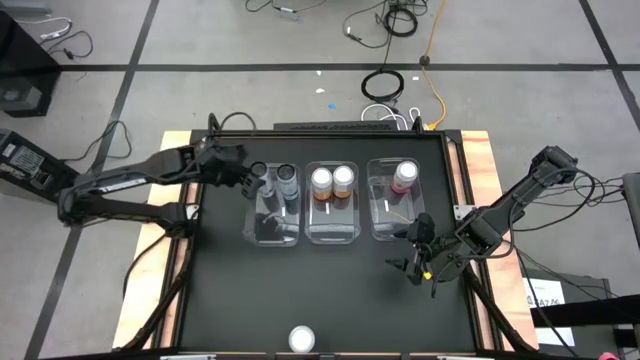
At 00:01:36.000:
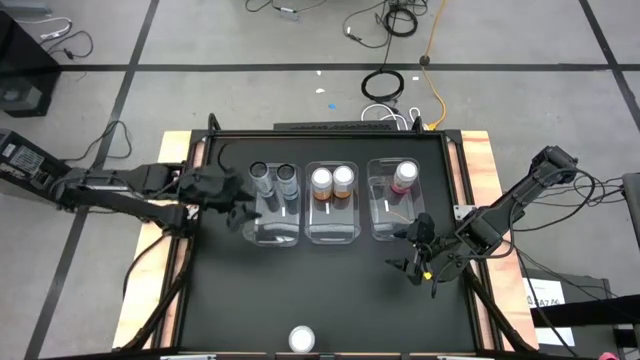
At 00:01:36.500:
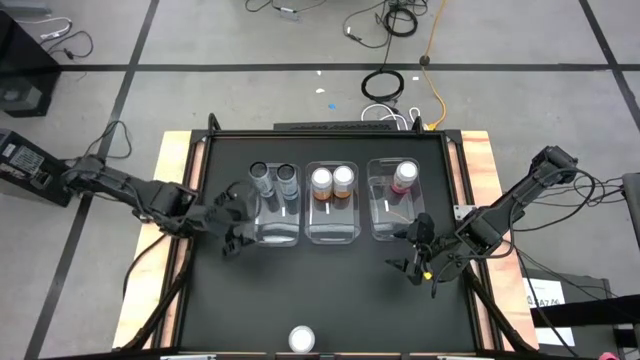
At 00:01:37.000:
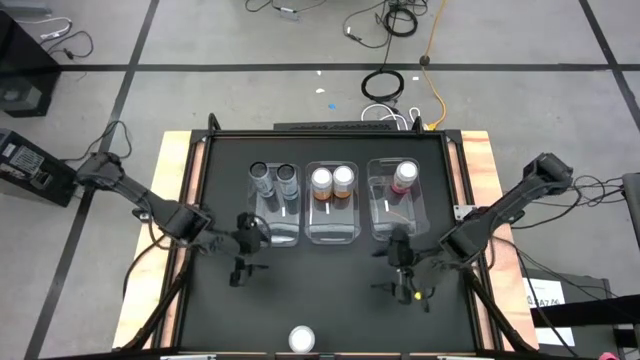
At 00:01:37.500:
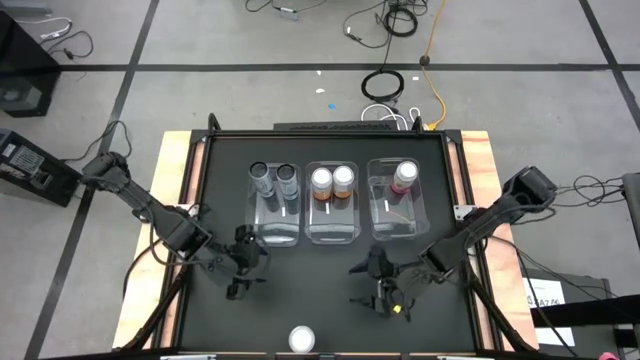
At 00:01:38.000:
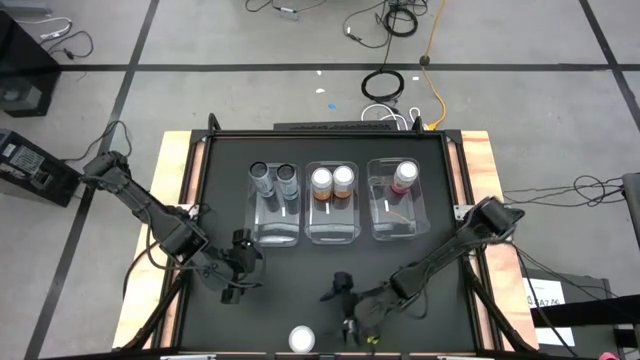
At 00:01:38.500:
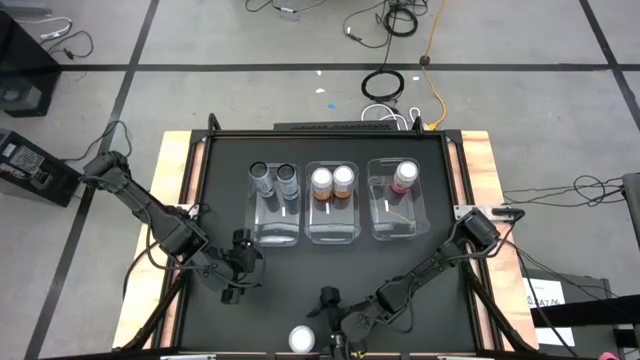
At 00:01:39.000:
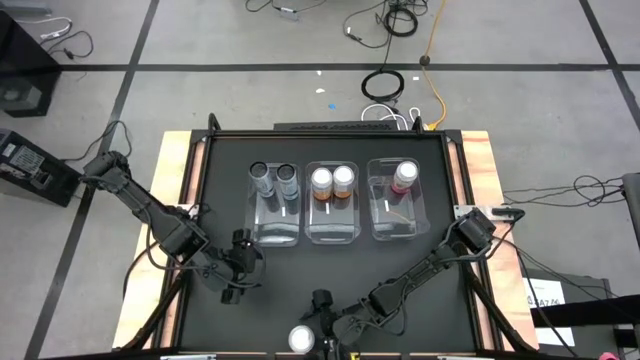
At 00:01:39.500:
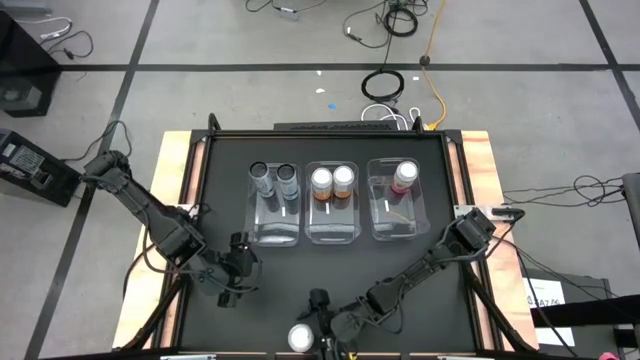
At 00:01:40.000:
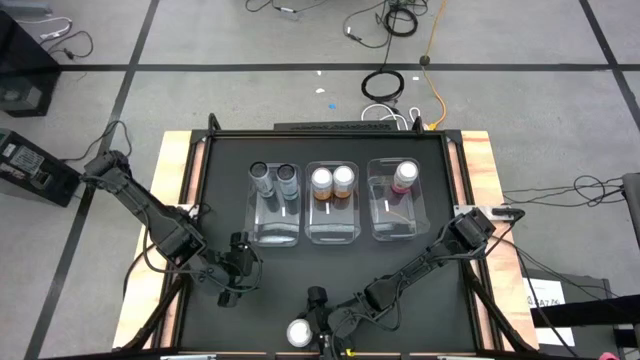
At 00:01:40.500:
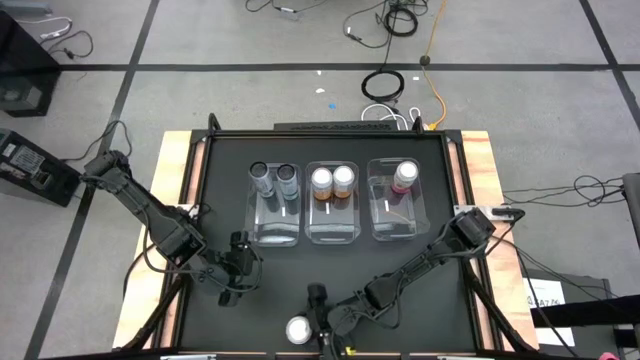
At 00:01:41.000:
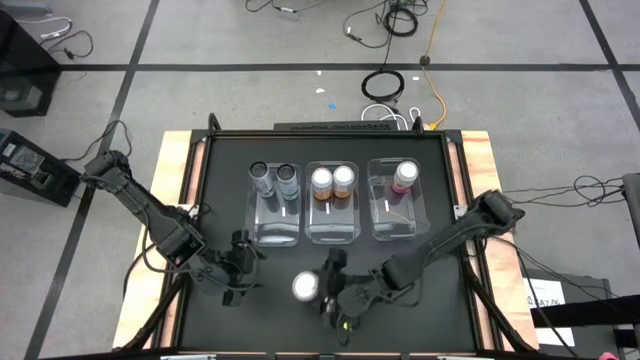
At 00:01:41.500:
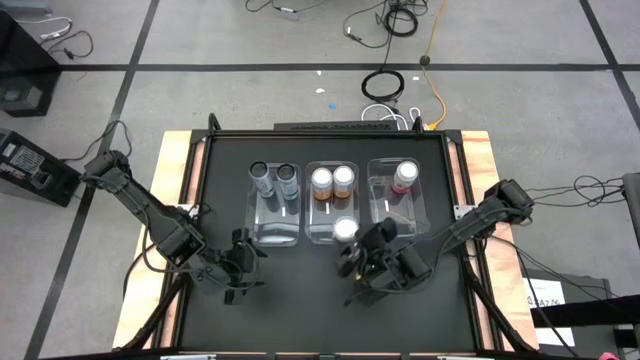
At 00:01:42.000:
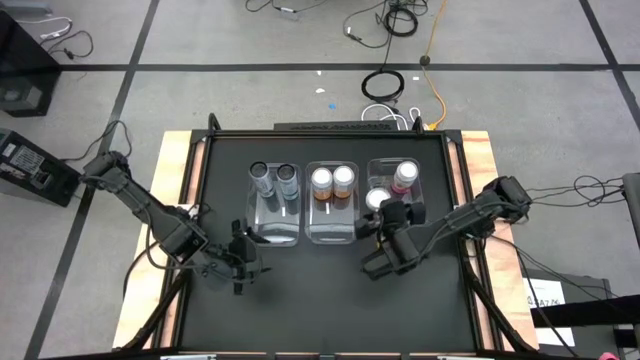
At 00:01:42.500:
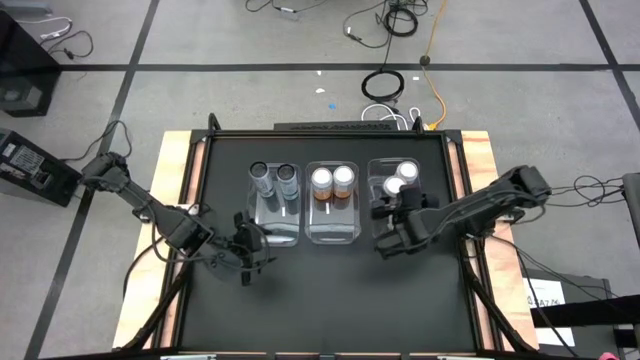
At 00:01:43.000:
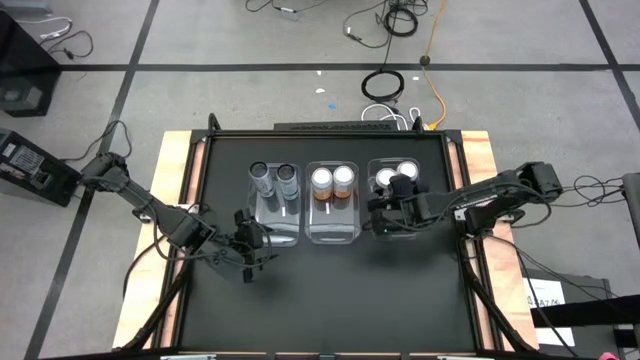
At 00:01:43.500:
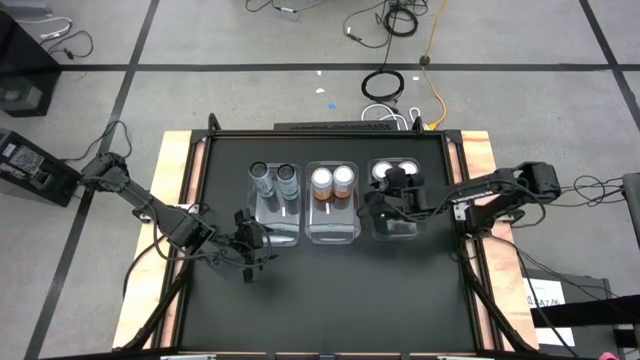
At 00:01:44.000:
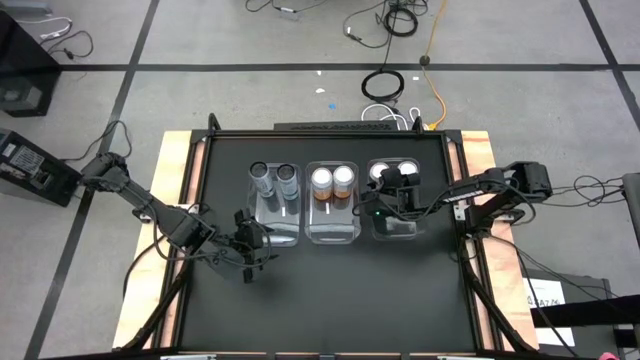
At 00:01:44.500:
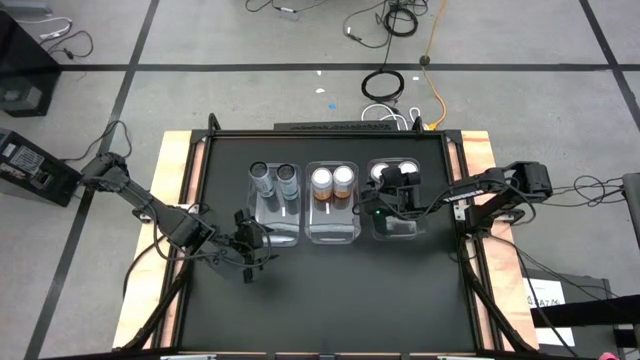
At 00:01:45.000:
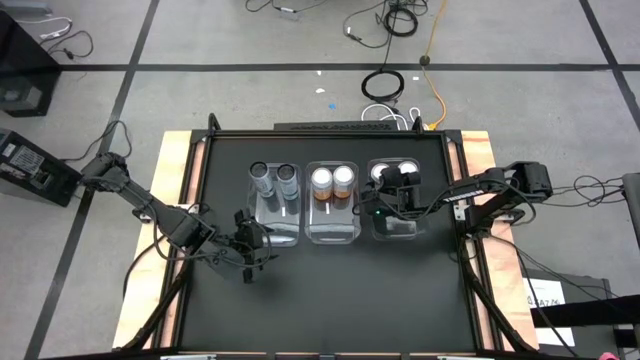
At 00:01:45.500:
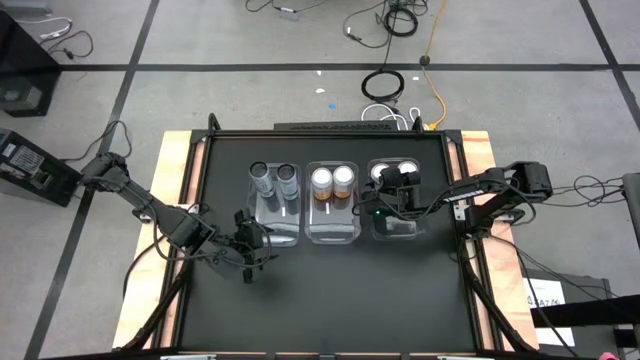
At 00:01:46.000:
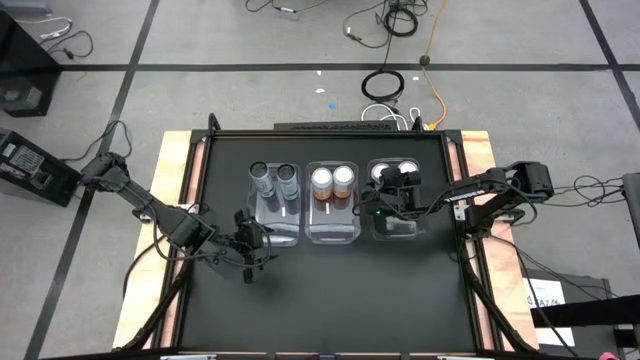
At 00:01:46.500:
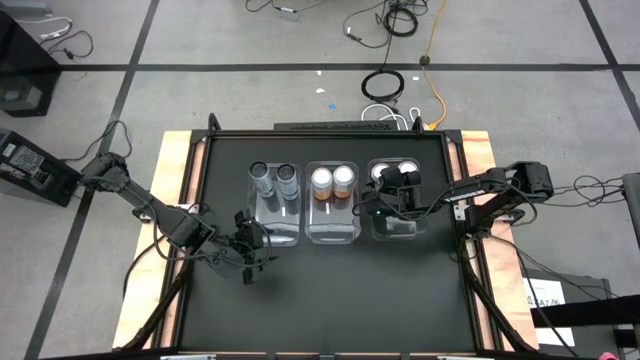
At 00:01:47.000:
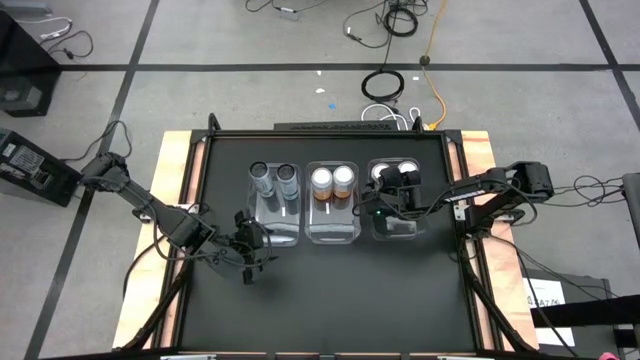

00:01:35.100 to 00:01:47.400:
Task: Sort soda cans
Put the pink soda can into the right transparent bin

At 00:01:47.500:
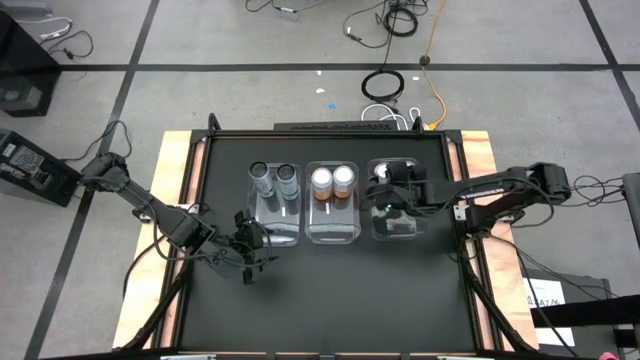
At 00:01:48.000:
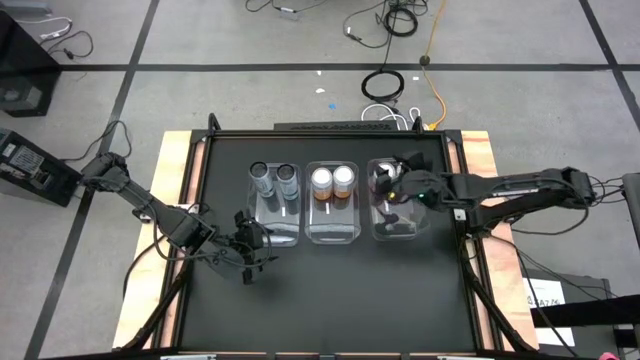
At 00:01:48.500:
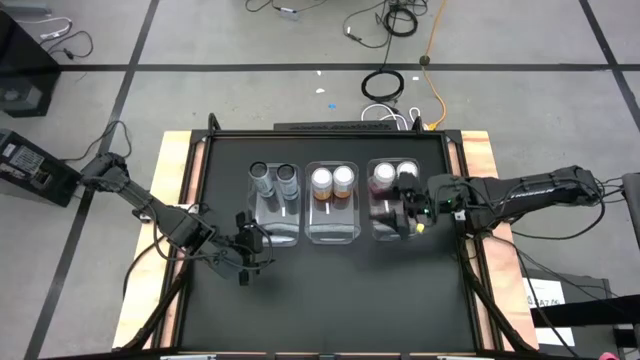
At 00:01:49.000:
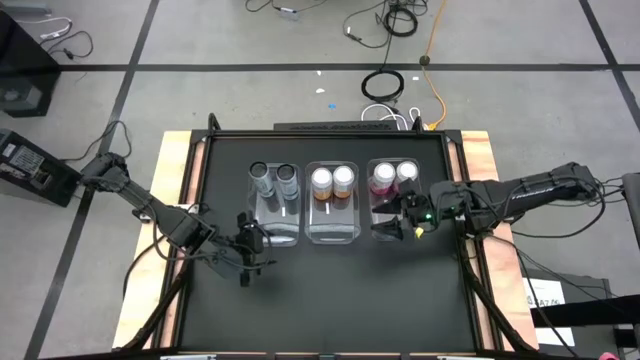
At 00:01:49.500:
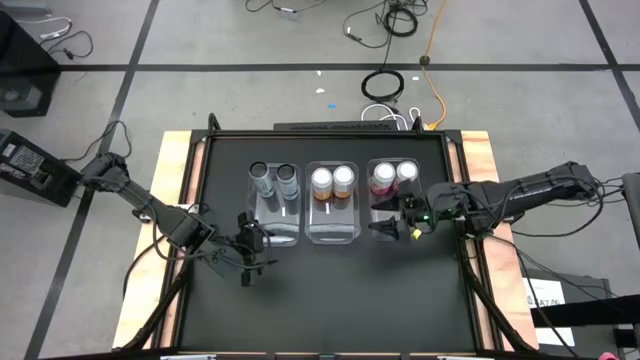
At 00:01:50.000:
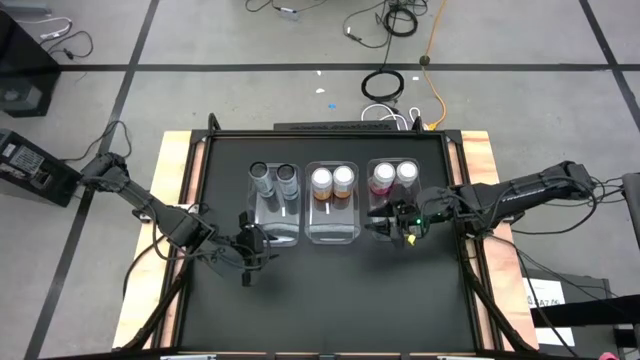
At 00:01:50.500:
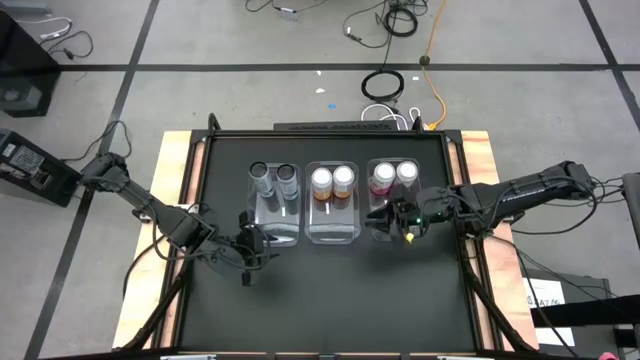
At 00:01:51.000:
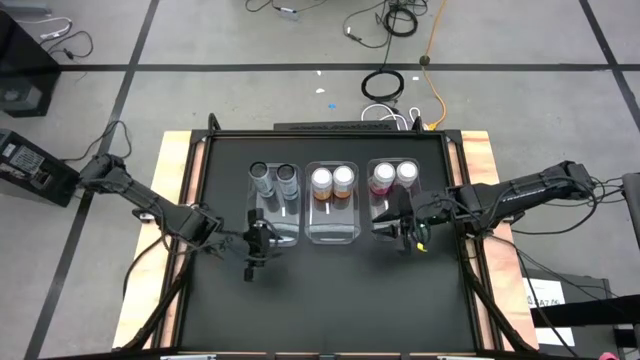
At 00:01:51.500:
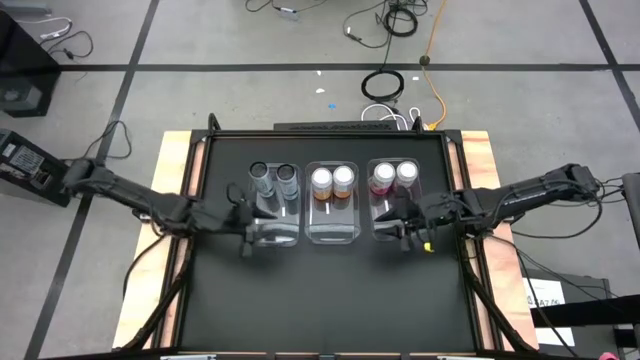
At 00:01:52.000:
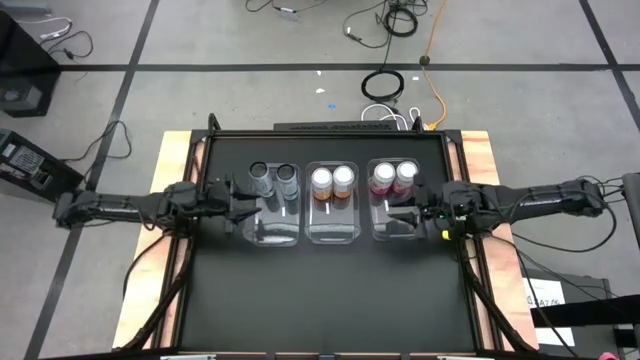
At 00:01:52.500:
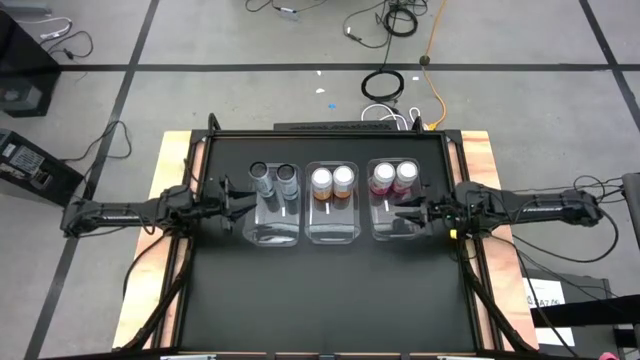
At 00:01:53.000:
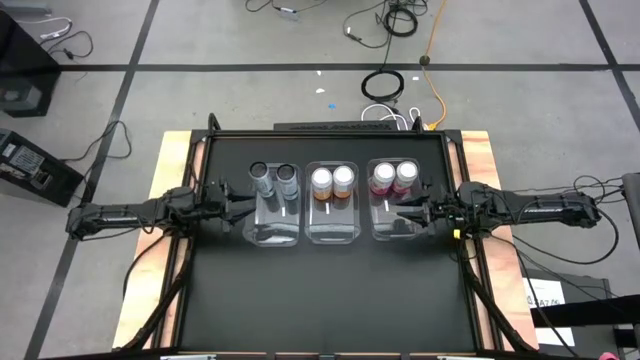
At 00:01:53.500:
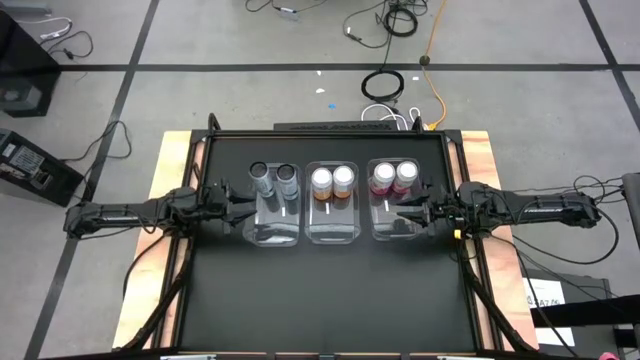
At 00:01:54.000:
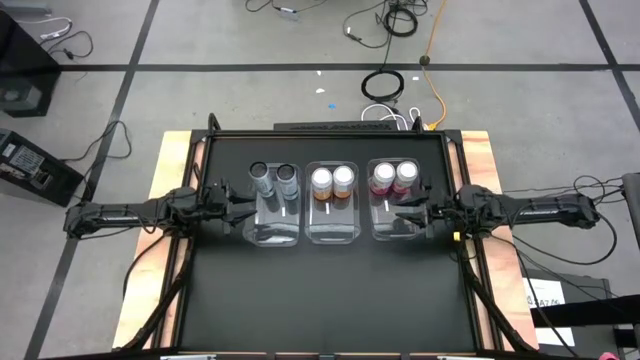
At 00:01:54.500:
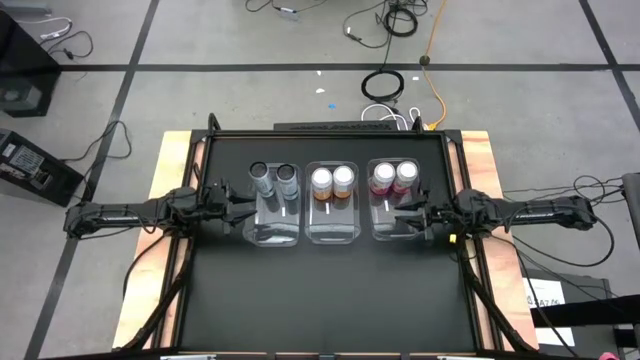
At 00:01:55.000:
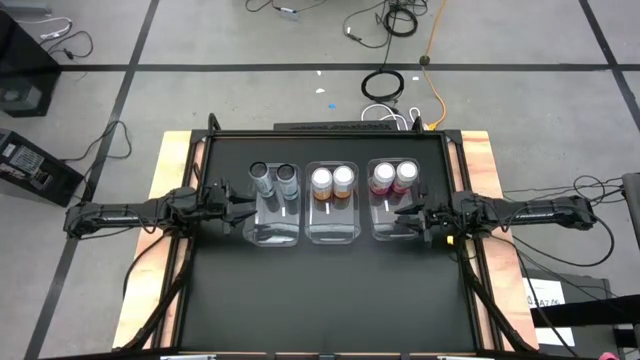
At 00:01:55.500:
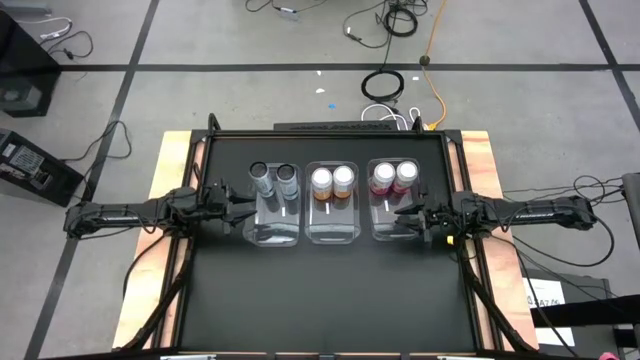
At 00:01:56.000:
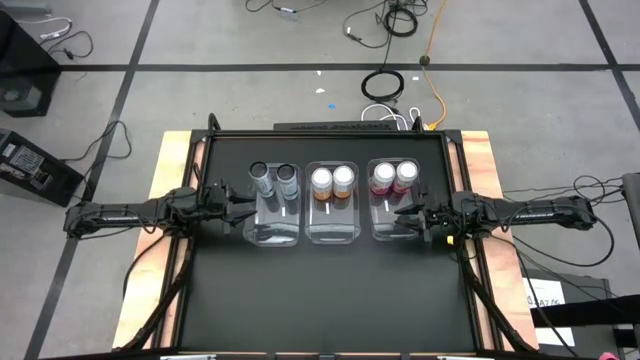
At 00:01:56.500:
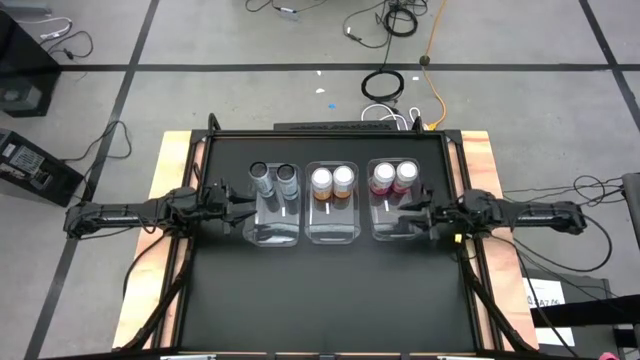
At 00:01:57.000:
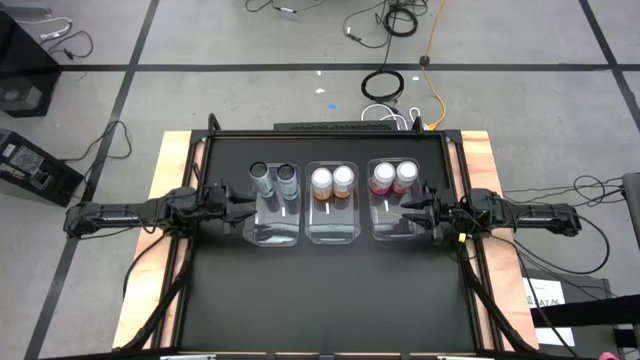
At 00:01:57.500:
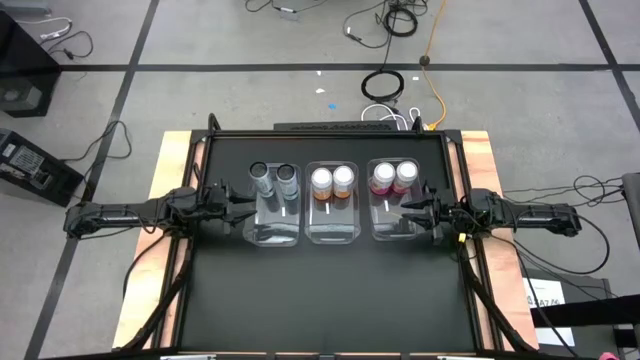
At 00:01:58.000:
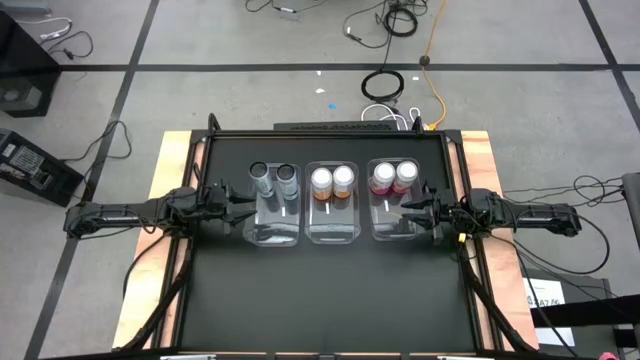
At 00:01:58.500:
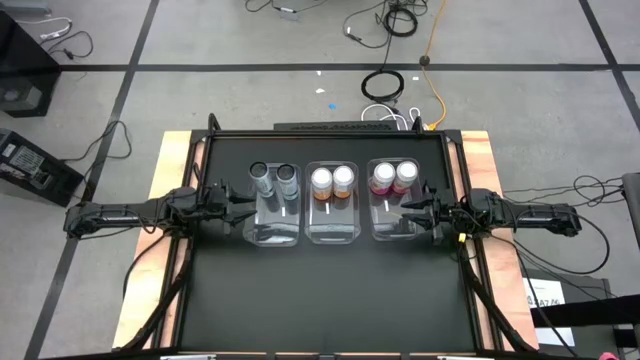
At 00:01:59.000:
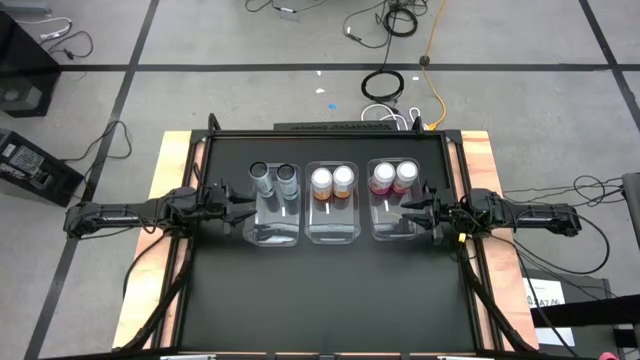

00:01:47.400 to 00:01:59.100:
Return to Home Position
